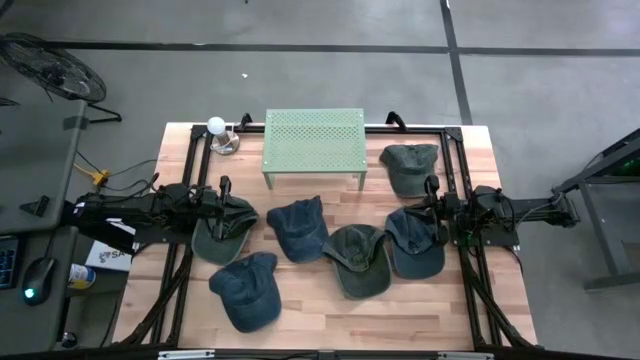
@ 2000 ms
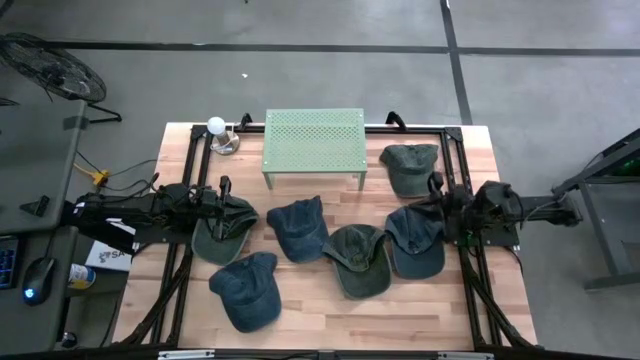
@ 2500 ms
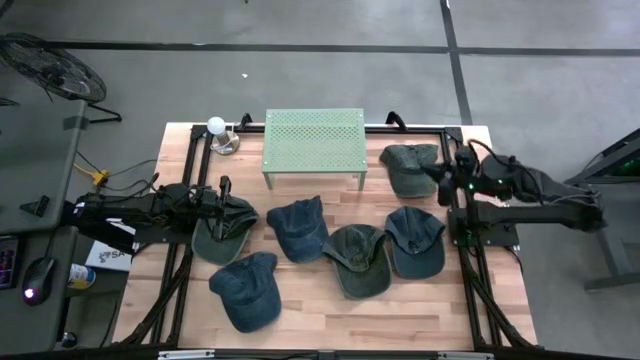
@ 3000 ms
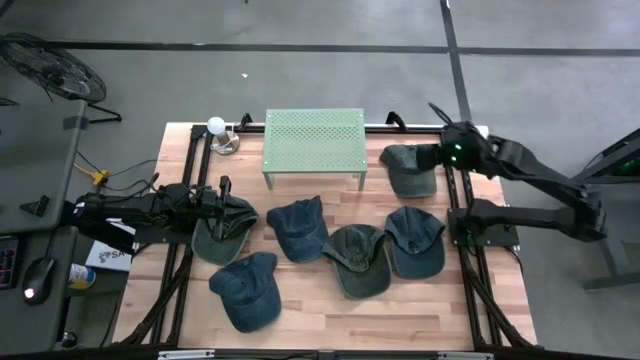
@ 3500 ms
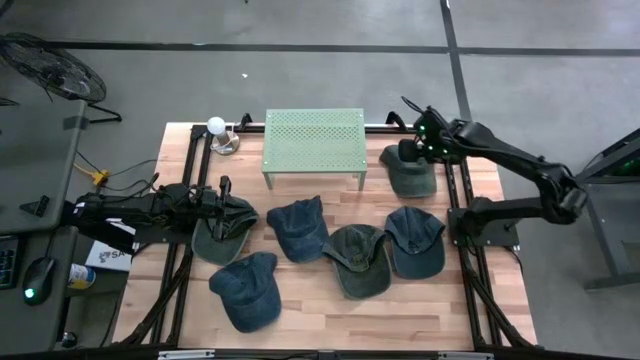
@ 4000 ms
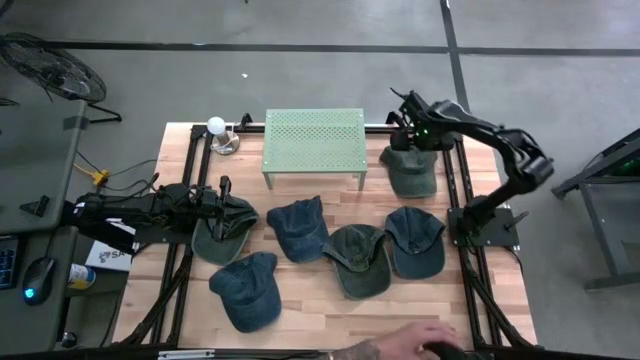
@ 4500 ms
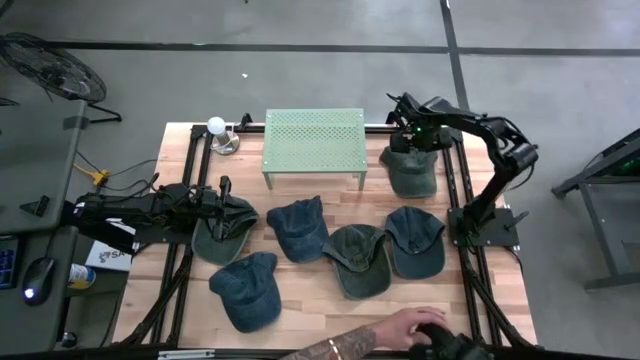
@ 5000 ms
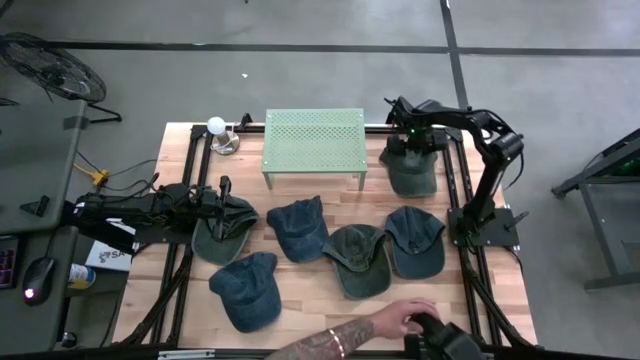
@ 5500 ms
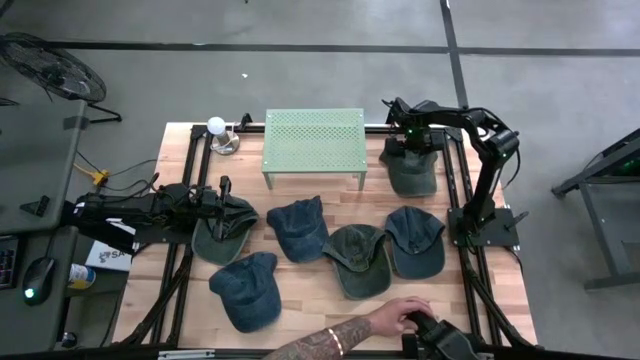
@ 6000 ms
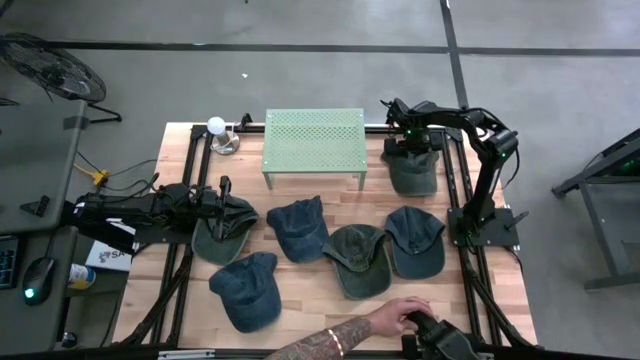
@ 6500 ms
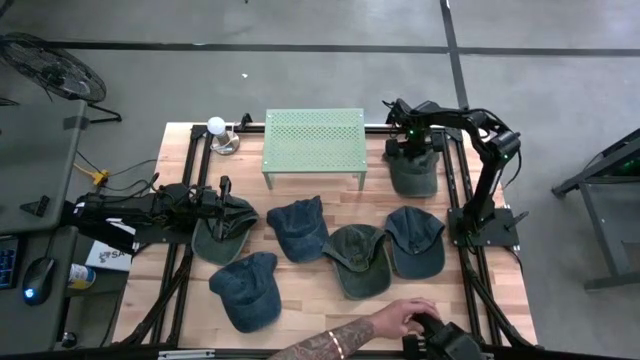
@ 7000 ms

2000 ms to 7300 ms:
Task: Pick & Place hat
Put the top gray cap on the shelf

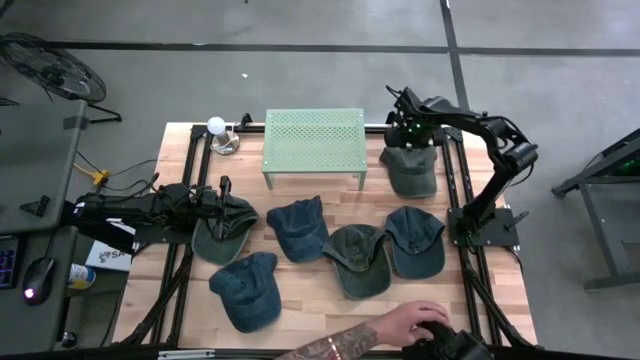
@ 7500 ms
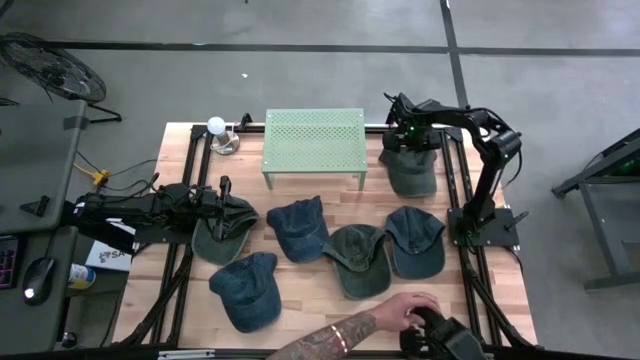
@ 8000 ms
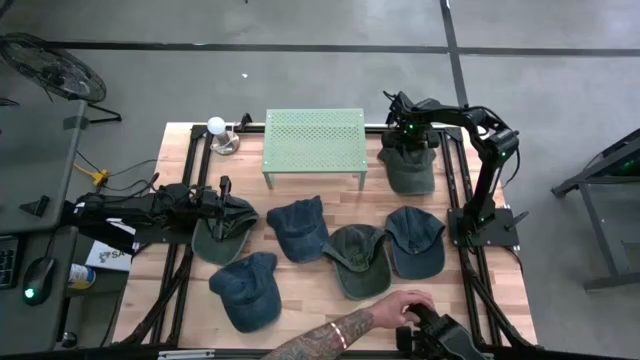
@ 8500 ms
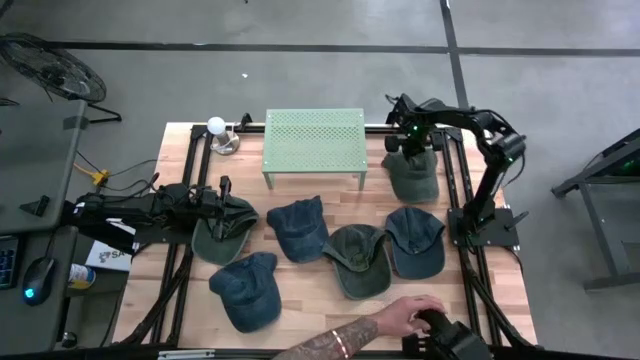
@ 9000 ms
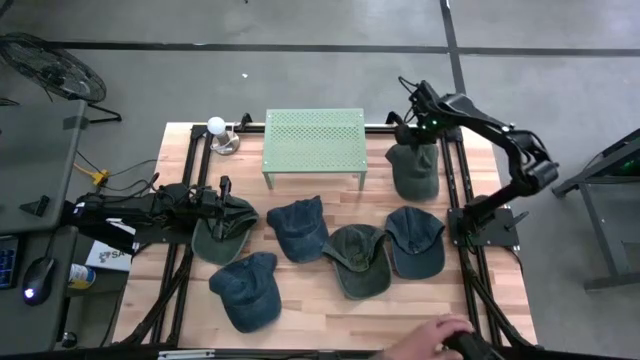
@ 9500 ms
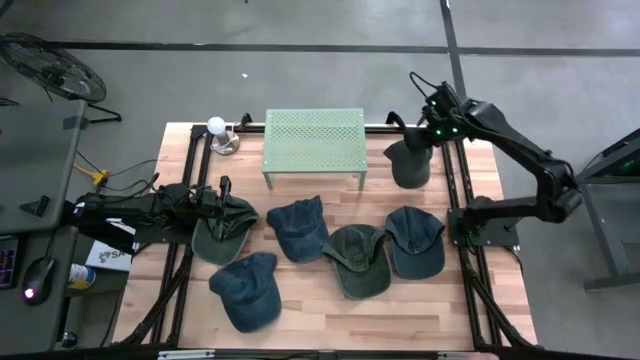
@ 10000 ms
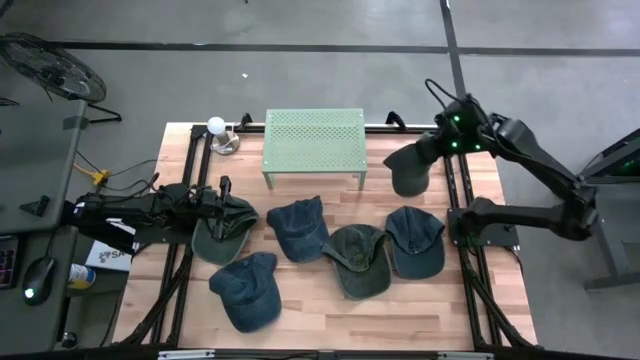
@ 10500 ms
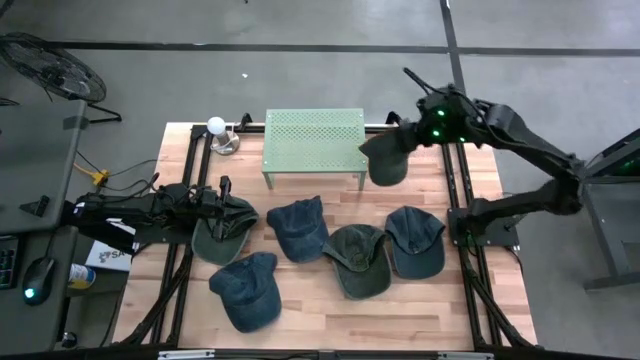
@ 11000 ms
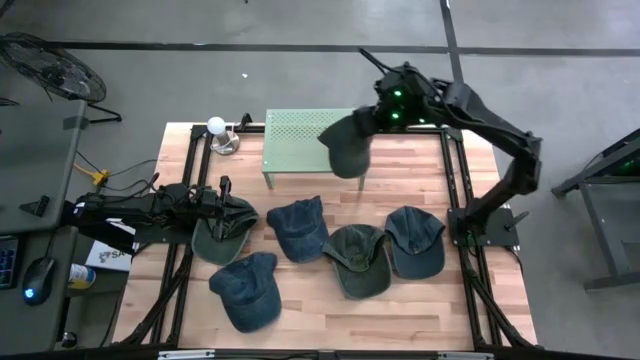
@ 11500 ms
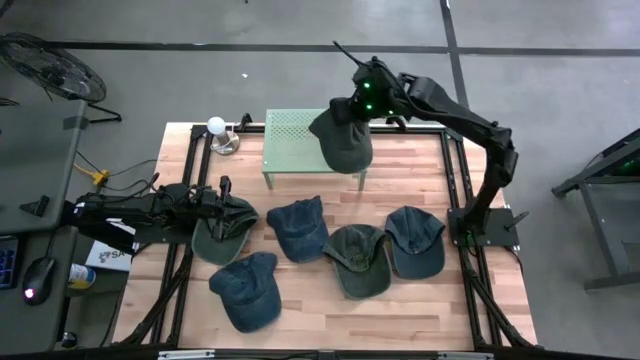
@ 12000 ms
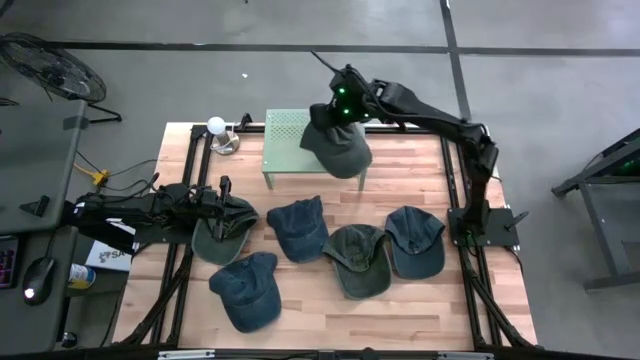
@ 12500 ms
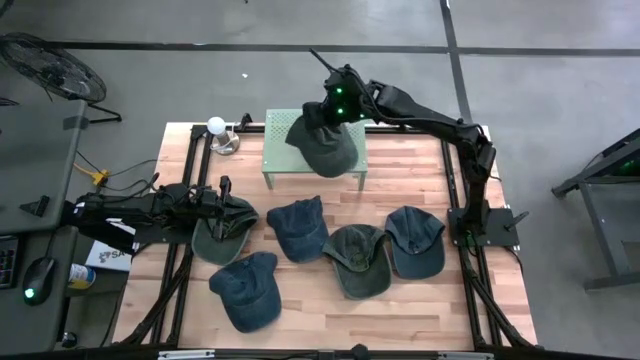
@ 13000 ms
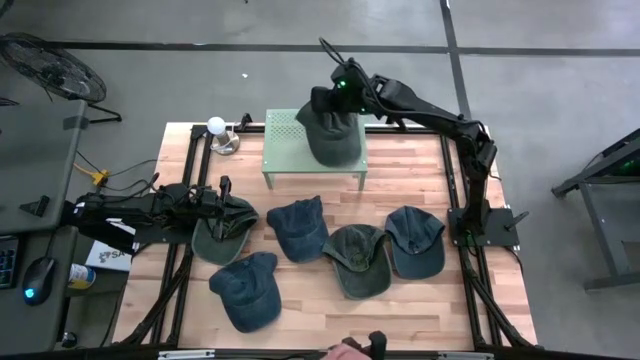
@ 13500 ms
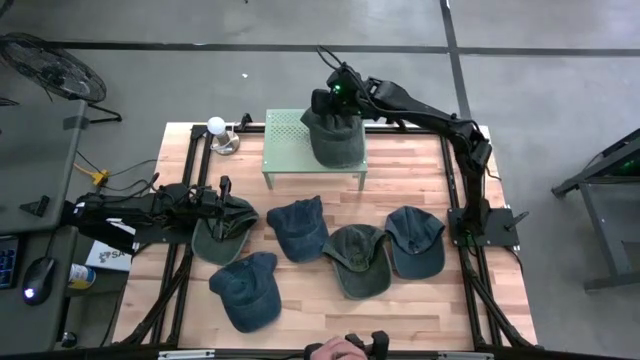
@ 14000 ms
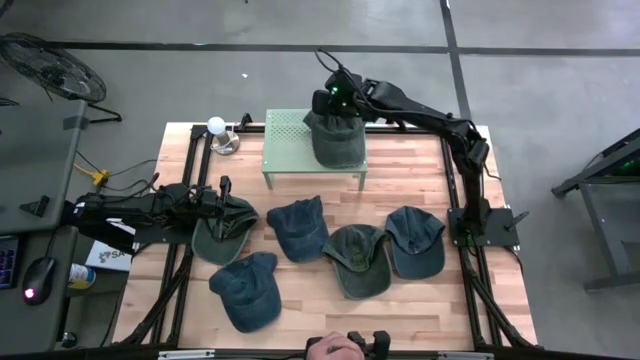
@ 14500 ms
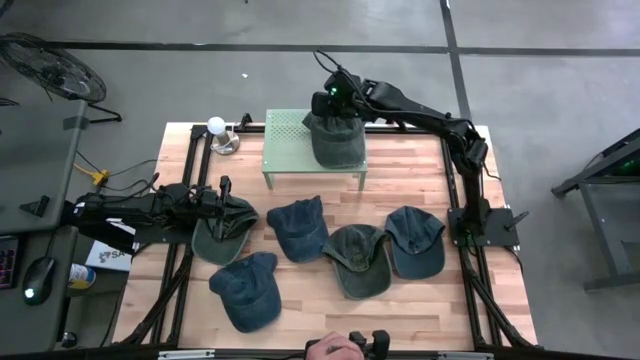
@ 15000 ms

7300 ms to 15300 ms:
Put the top gray cap on the shelf

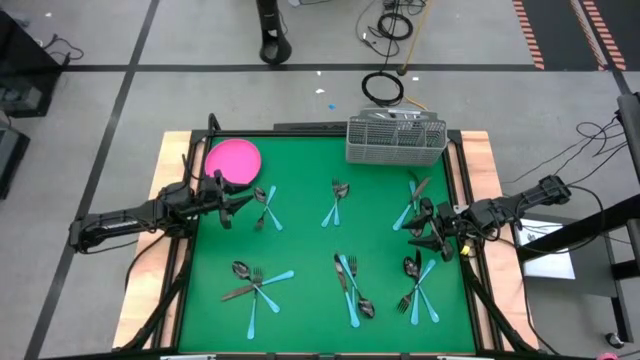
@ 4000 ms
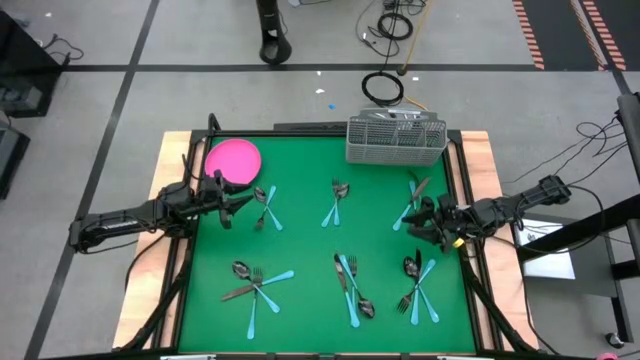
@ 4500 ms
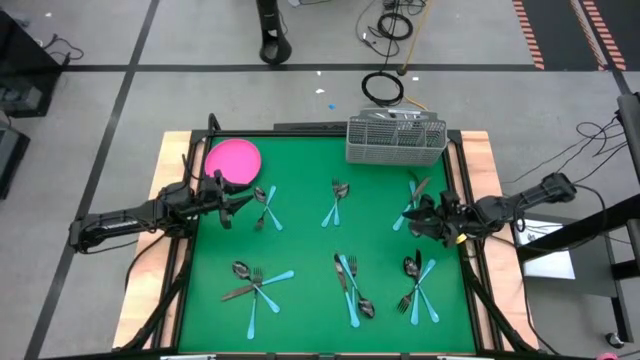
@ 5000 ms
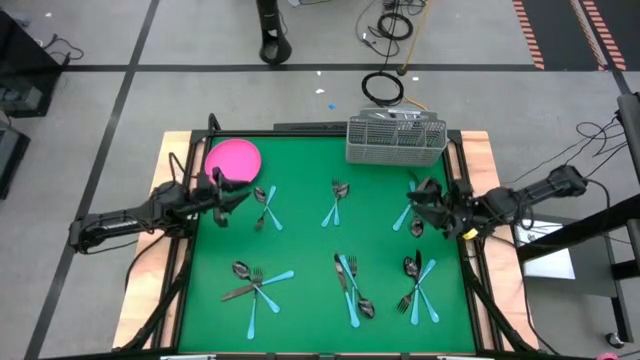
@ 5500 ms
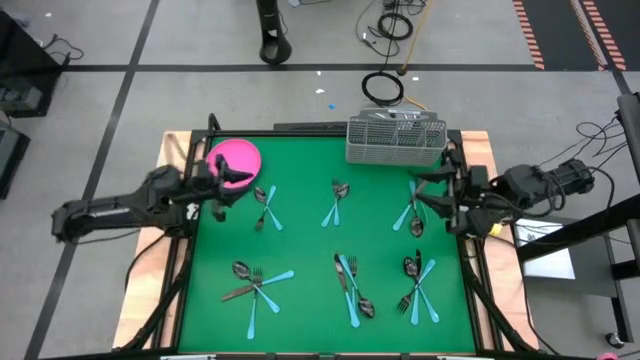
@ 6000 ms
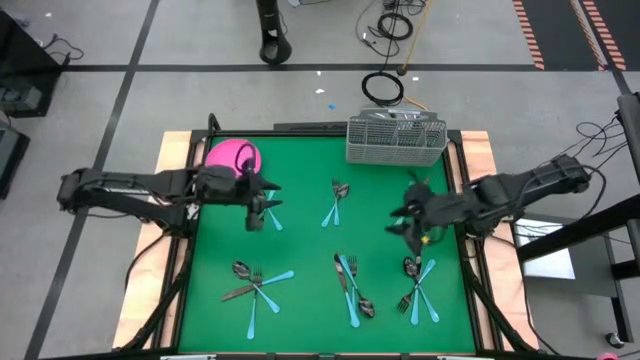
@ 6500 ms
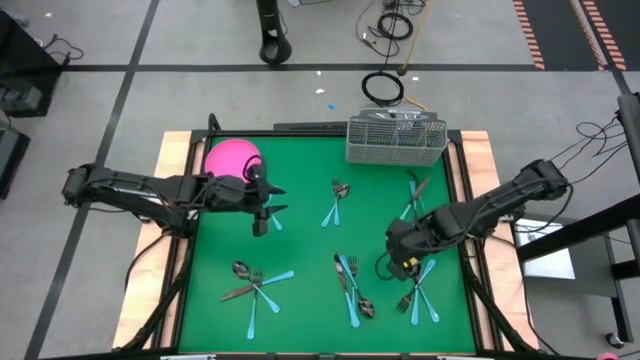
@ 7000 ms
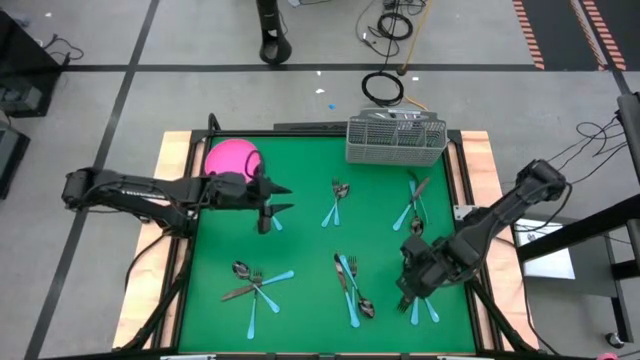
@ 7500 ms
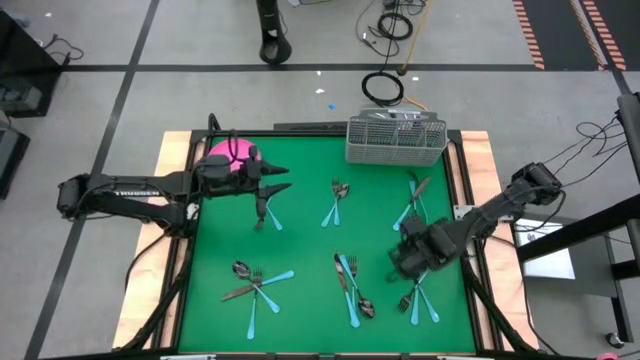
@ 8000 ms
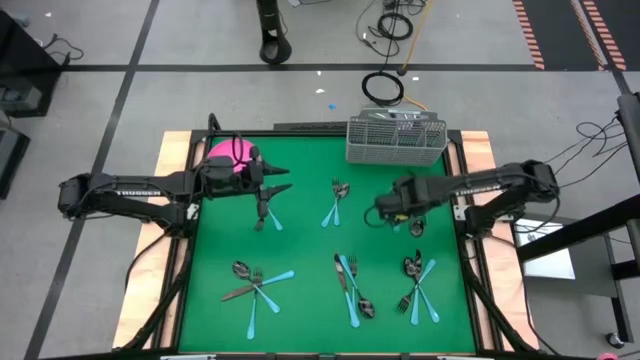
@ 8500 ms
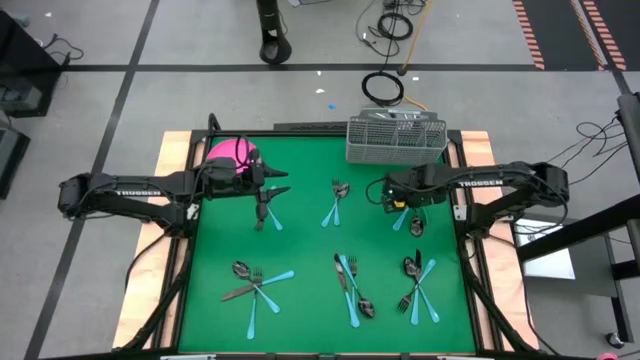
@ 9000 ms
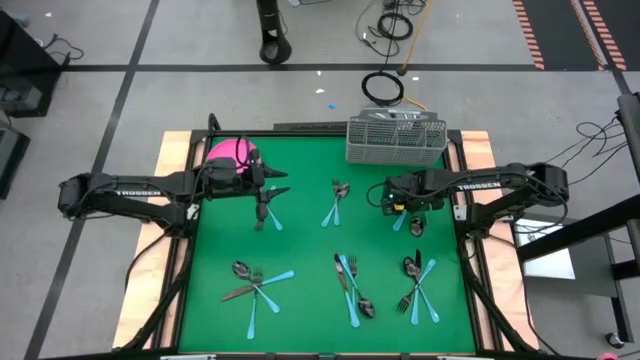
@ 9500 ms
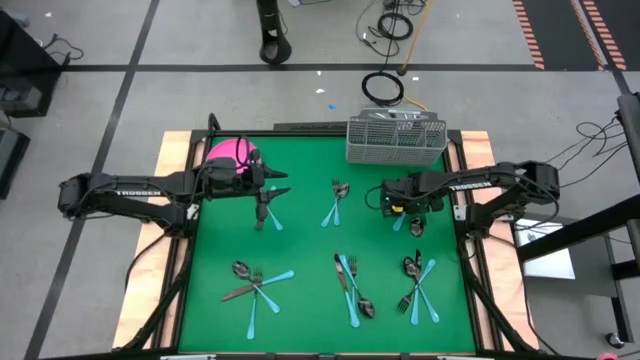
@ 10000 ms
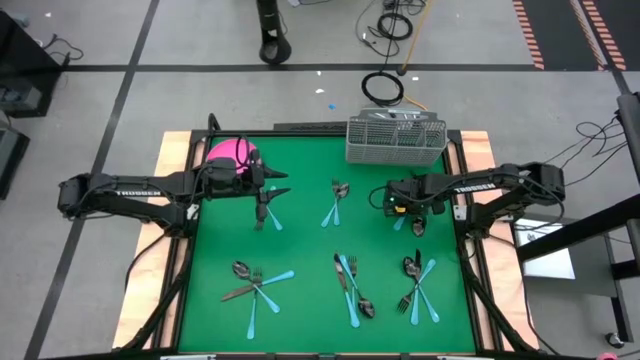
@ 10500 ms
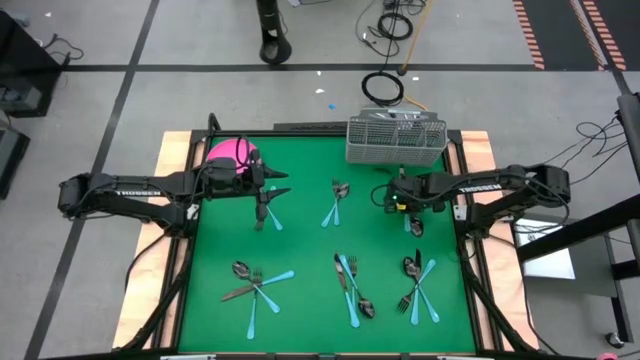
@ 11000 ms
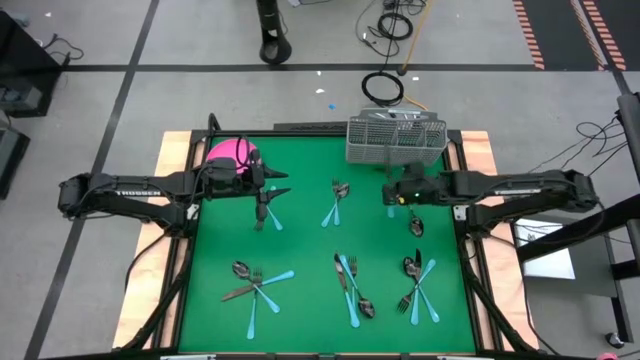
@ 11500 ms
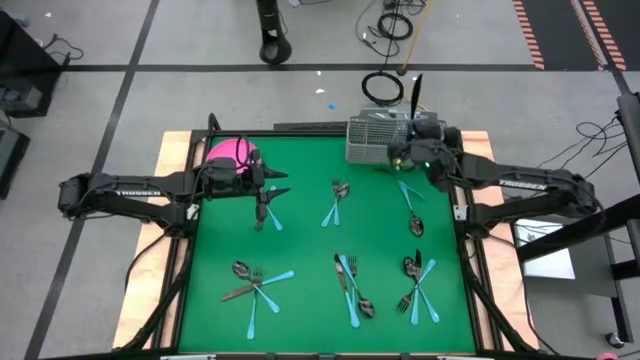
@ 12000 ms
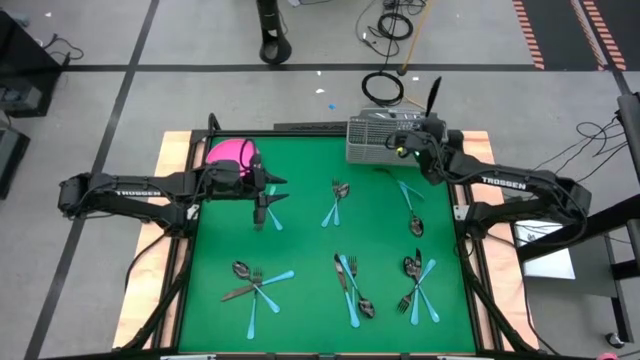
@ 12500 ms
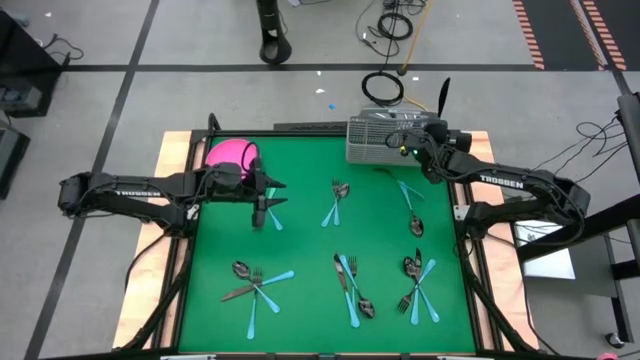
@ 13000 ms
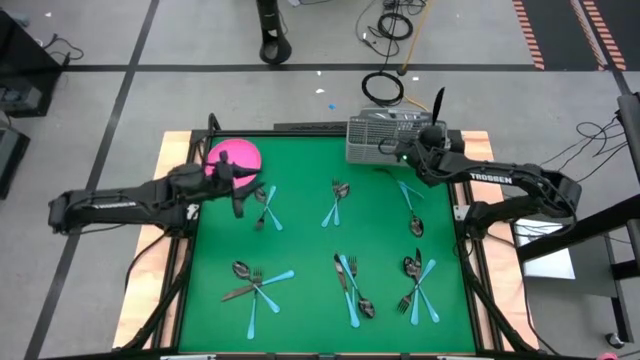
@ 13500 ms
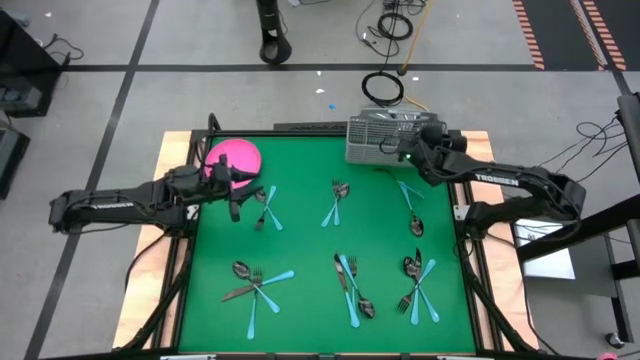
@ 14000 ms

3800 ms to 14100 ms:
Task: Sort silverware
Put the blue table knife into the gray silverware basket
